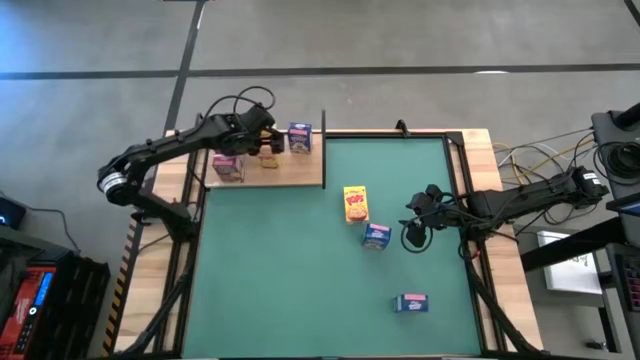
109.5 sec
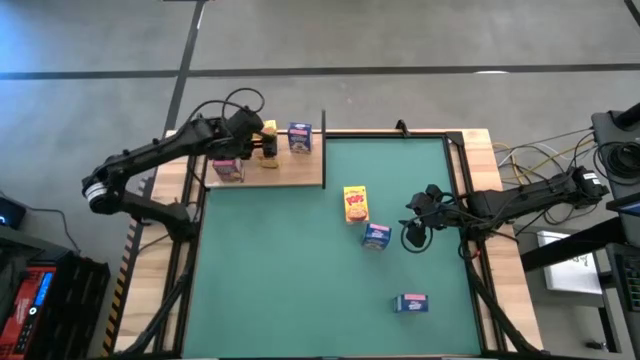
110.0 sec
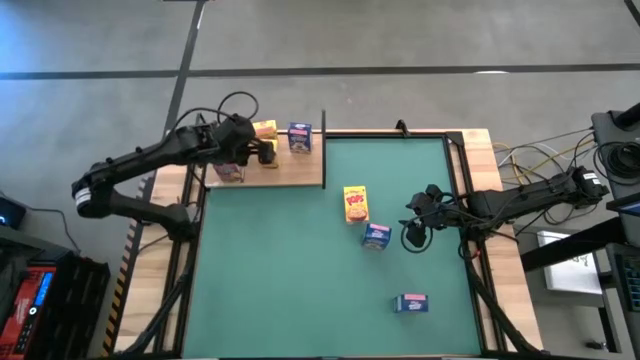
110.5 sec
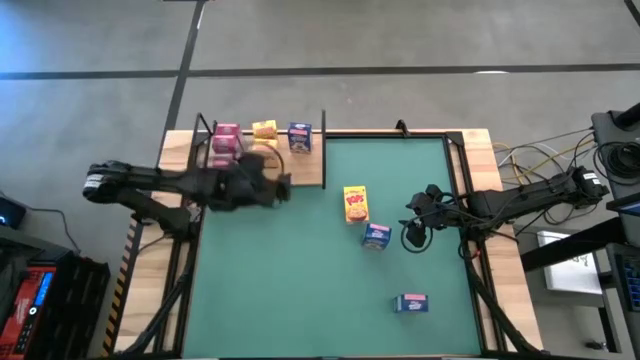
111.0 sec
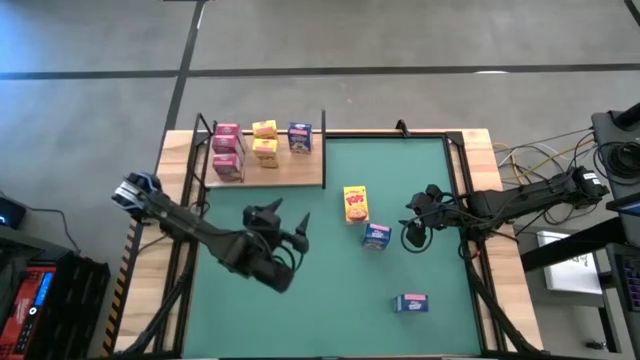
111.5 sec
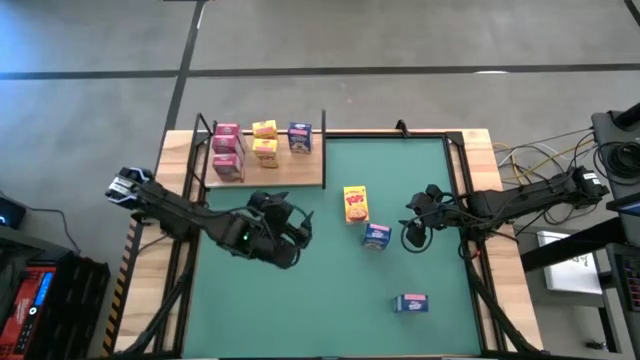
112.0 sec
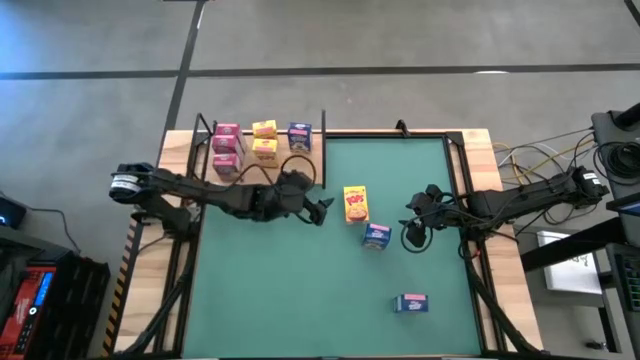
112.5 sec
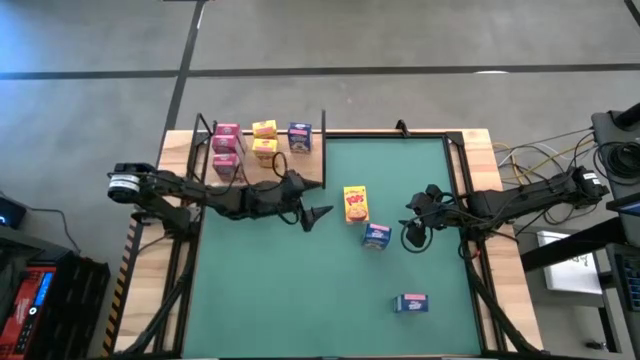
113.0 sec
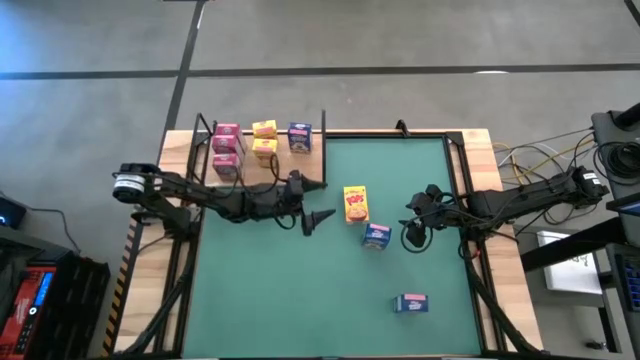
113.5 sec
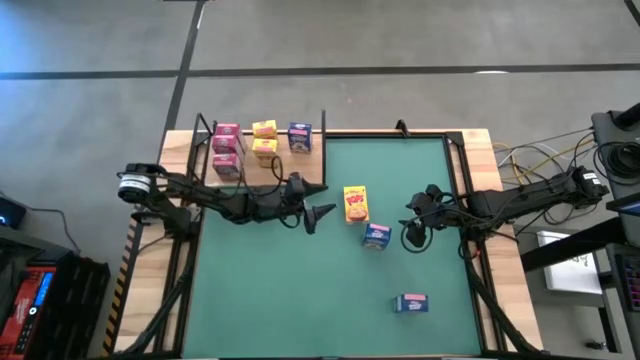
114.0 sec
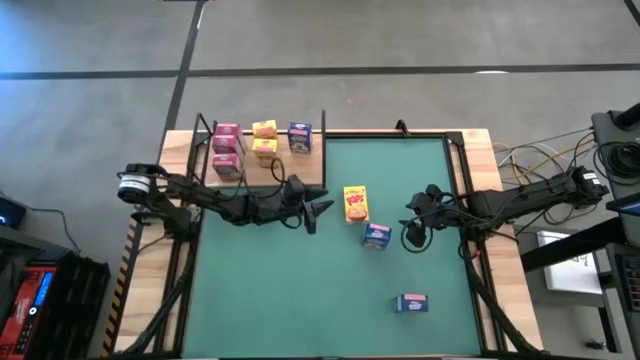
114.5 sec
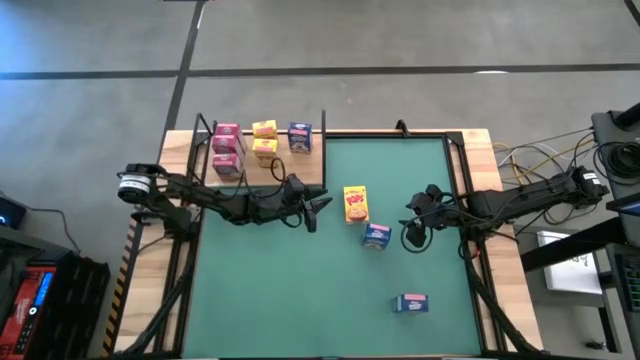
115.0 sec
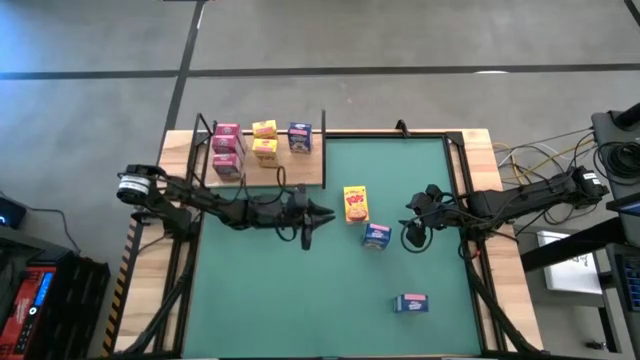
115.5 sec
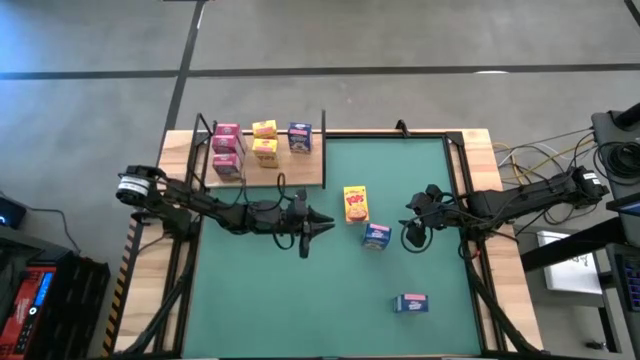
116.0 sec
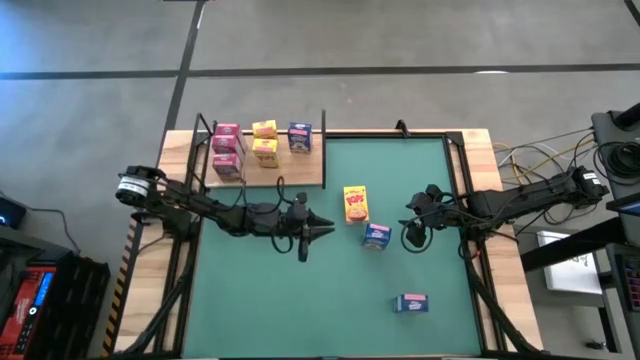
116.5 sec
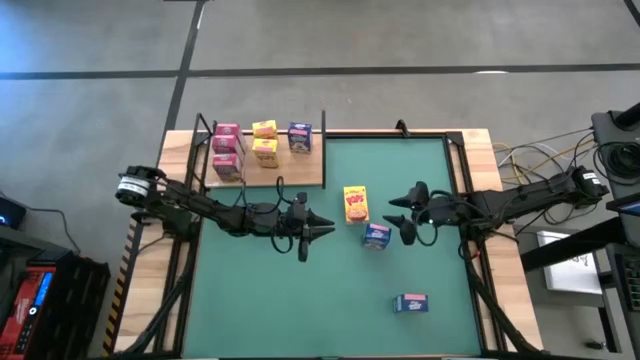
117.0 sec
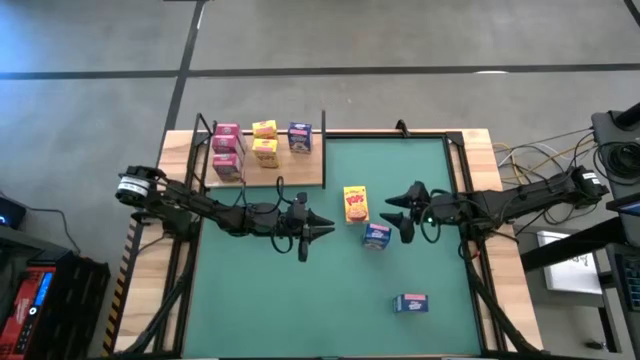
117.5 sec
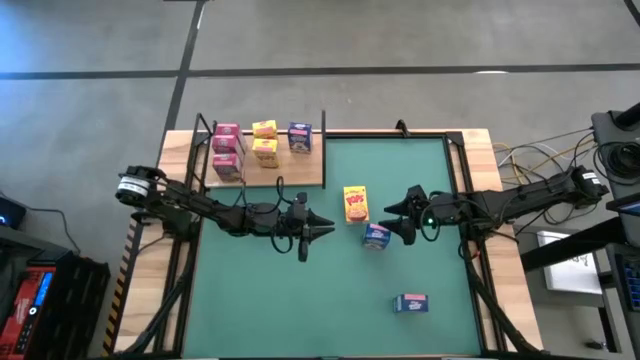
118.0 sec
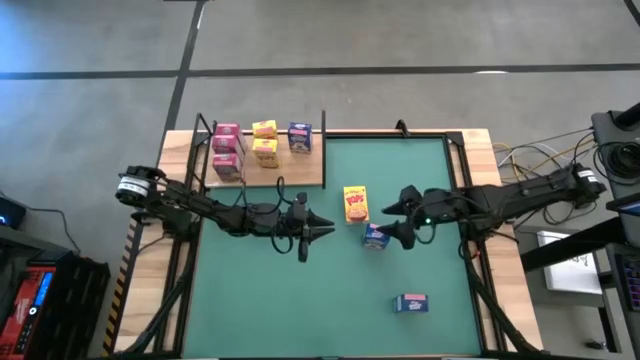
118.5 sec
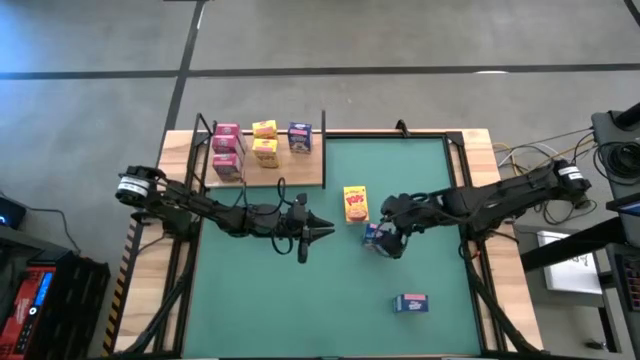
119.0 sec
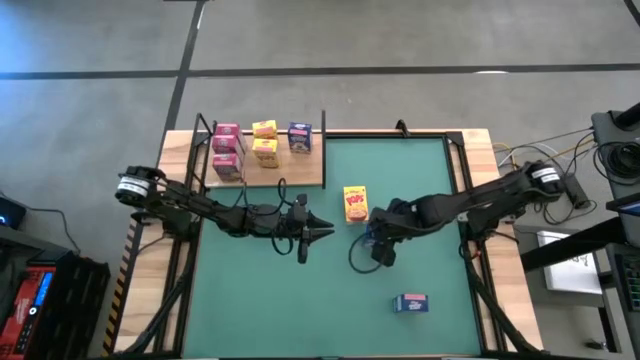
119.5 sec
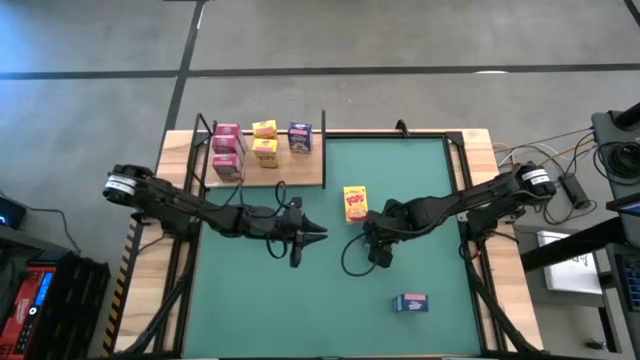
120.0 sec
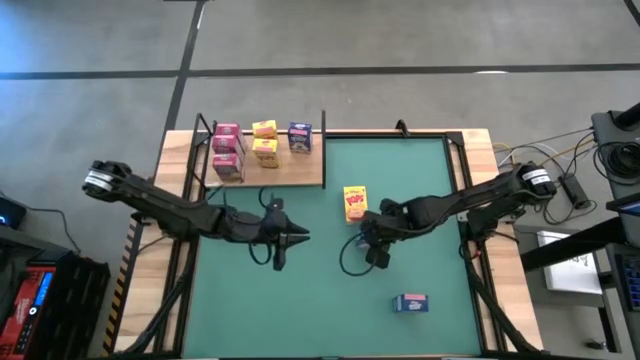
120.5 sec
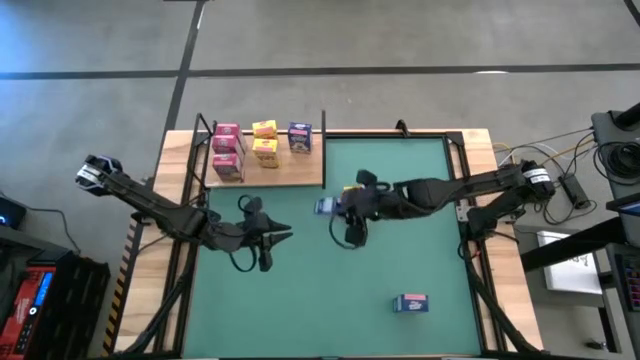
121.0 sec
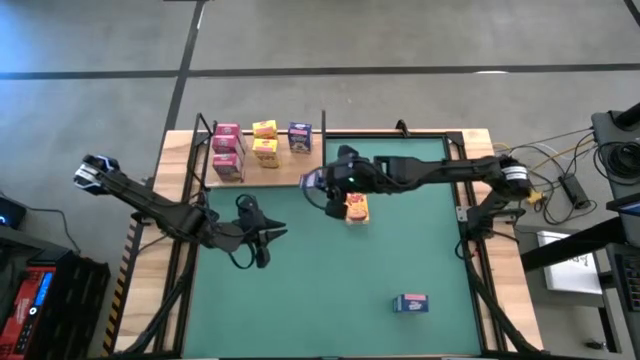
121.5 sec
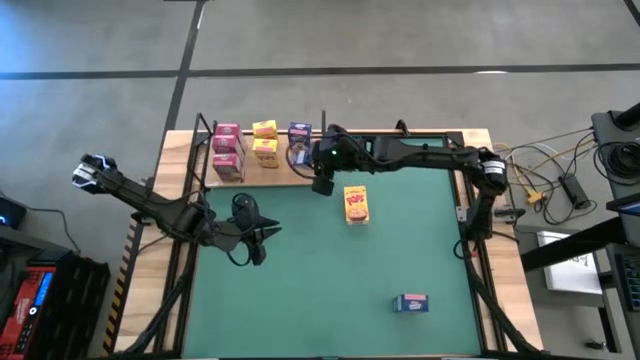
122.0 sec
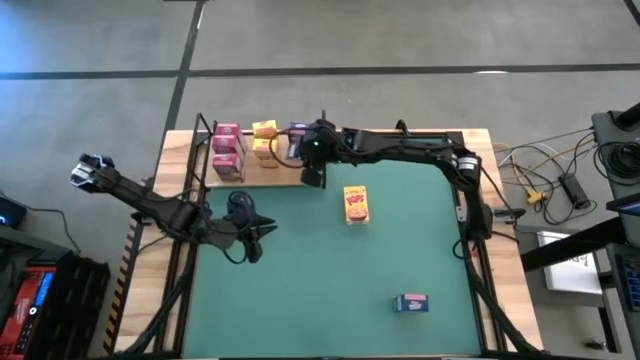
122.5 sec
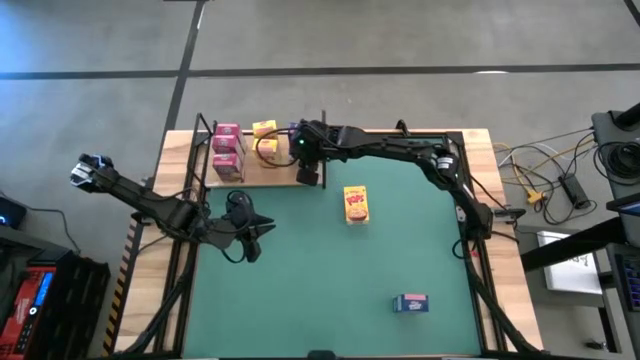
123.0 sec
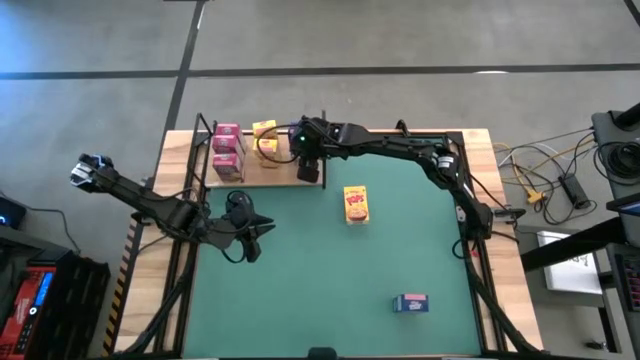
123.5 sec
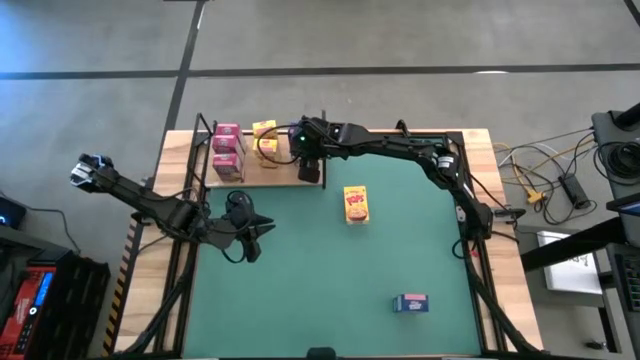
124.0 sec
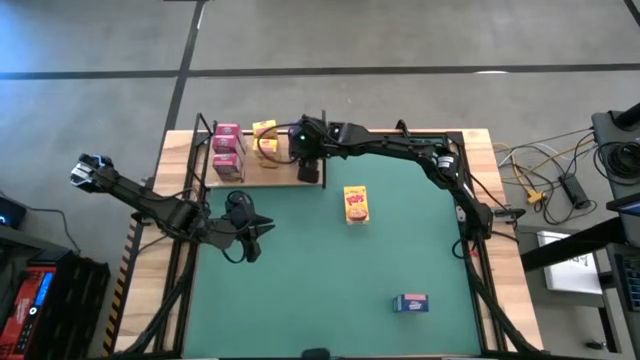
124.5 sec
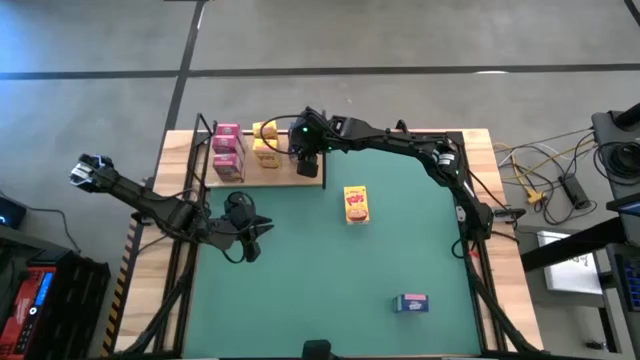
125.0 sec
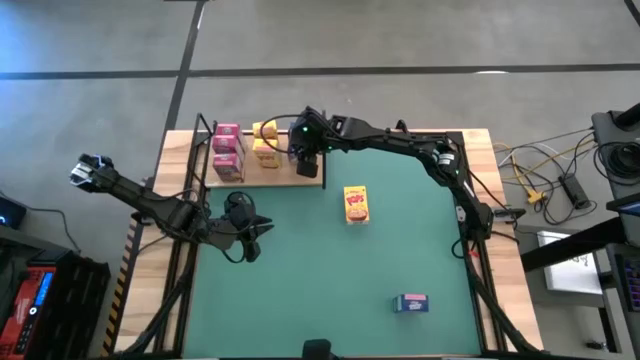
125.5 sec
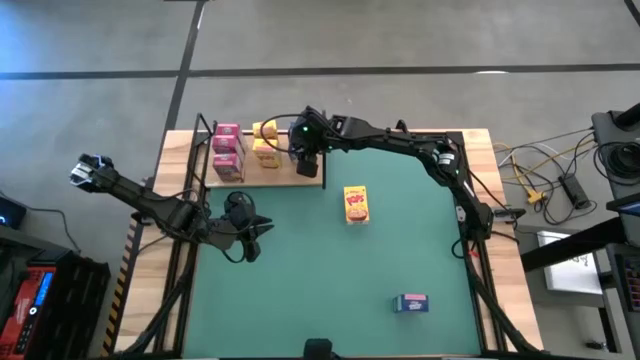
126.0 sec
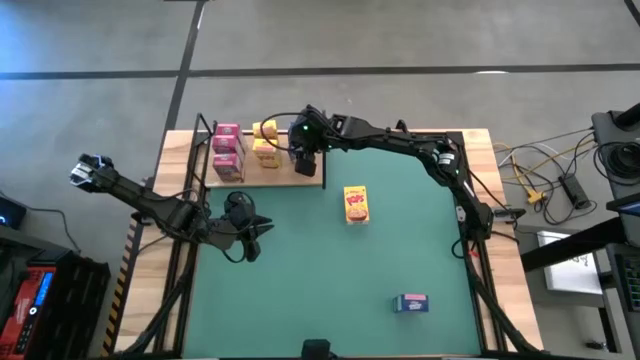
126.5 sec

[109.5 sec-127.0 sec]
Task: Stack cereal on shelf
Put the top blue cereal box on the shelf aligned with the blue cereal box

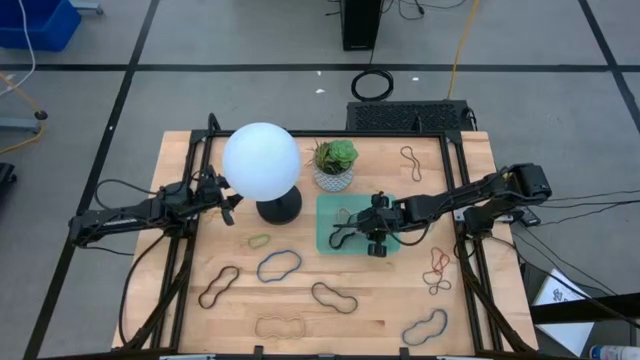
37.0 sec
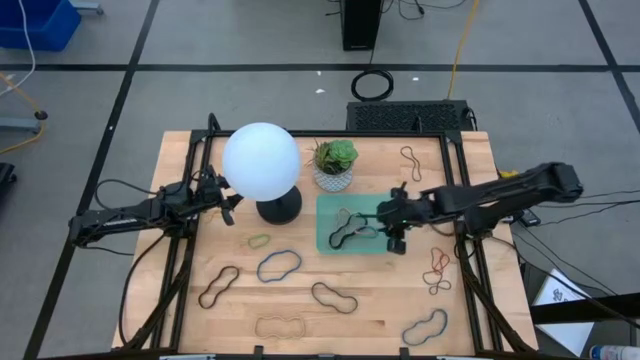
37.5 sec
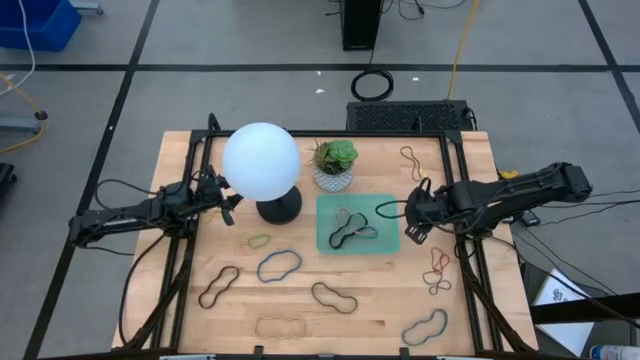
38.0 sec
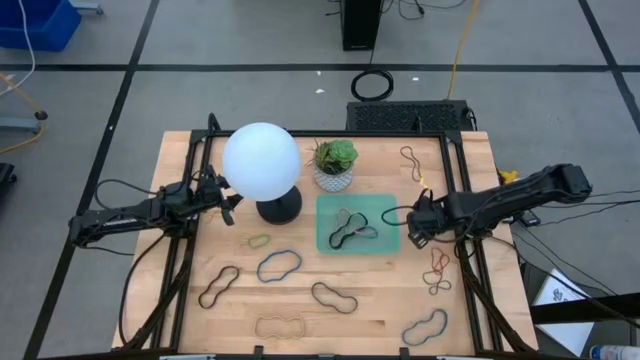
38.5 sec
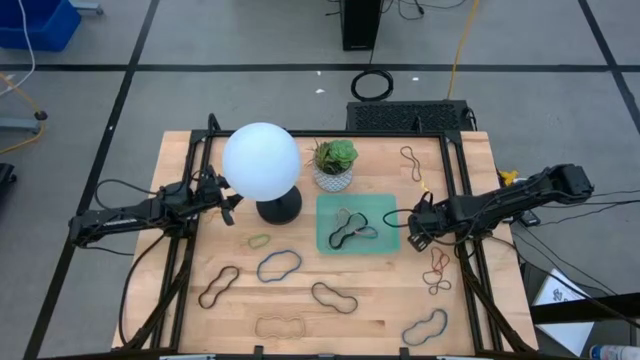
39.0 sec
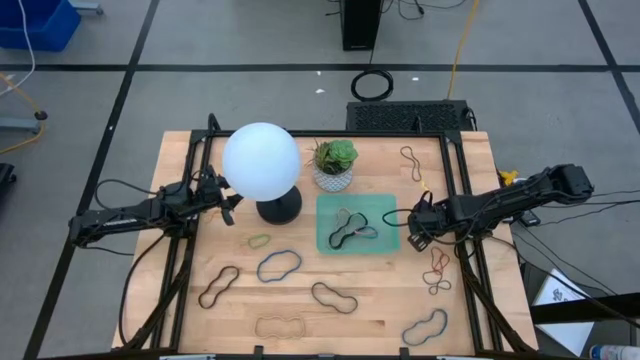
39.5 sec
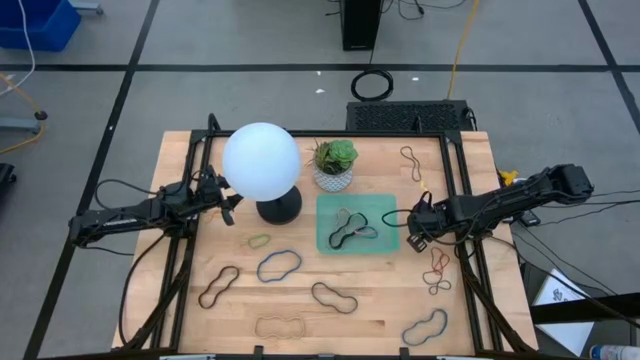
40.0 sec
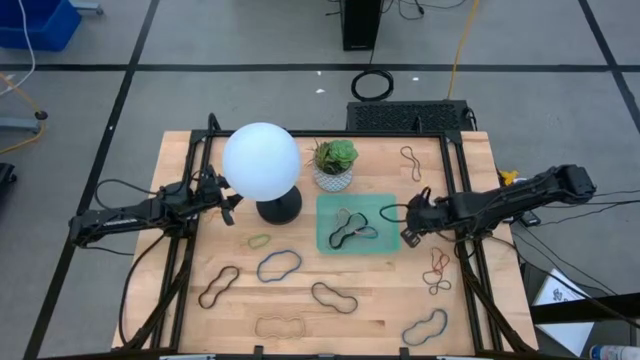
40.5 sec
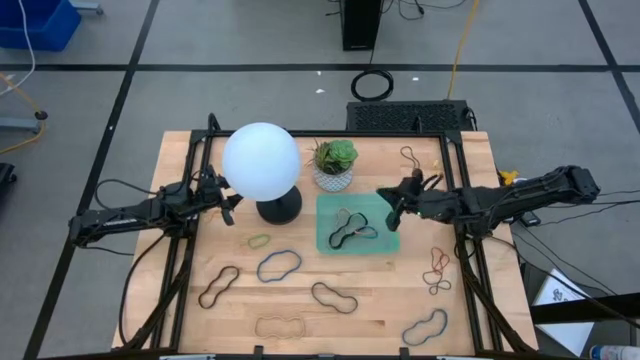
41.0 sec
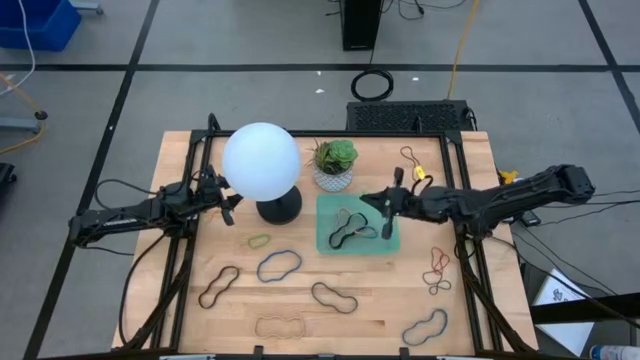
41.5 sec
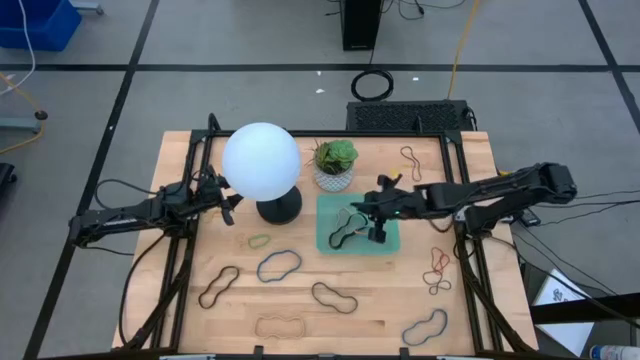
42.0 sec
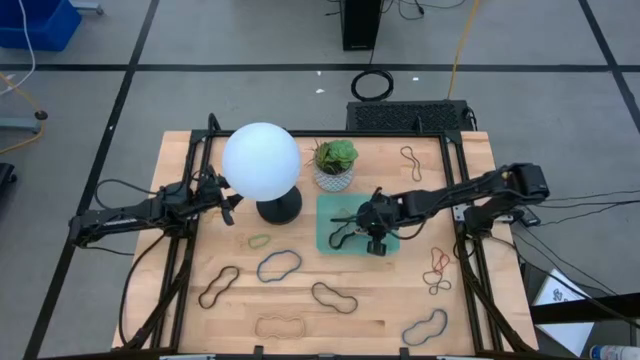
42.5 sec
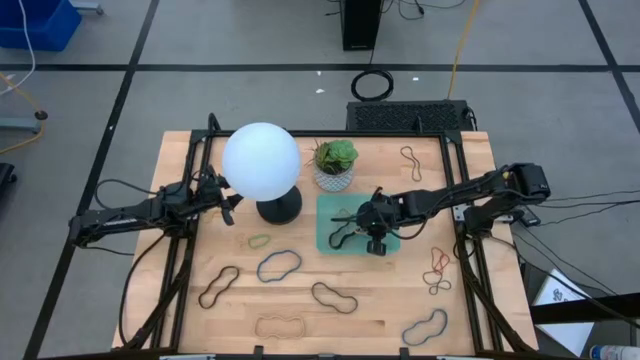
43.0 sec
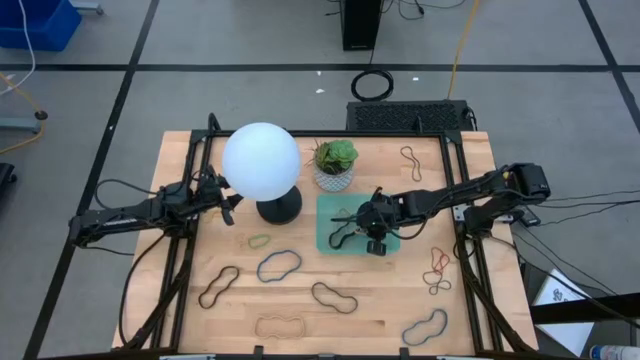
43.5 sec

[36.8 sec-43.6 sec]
Task: Pick and place rubber bands into bin
Put the top green rubber band into the blue bin
